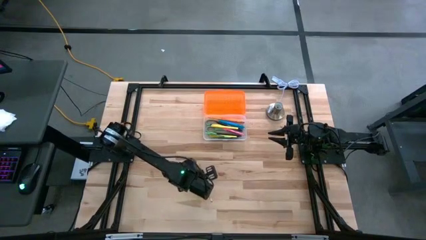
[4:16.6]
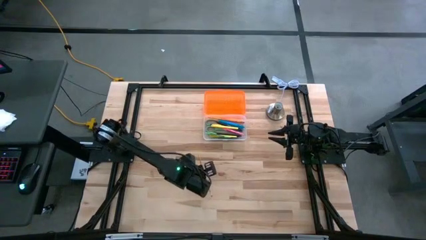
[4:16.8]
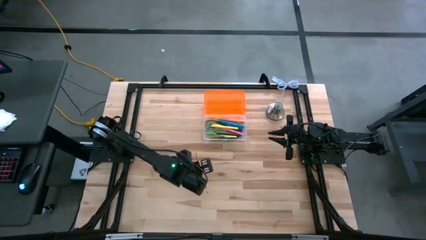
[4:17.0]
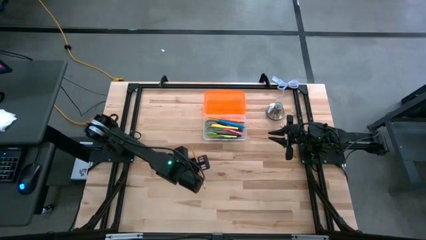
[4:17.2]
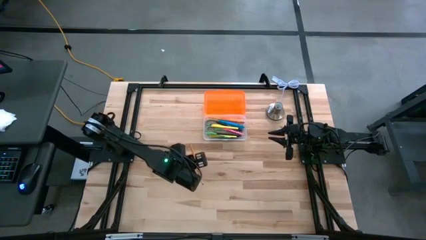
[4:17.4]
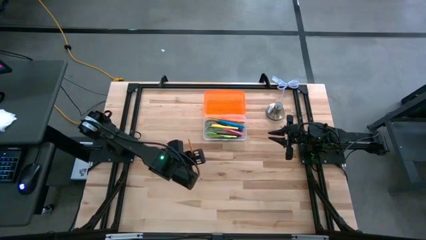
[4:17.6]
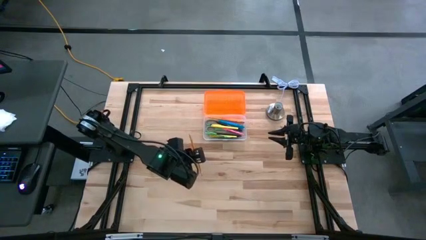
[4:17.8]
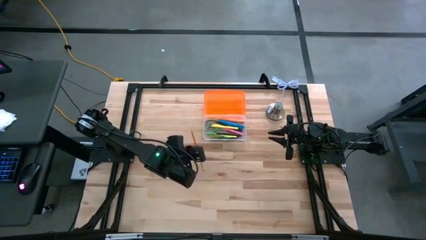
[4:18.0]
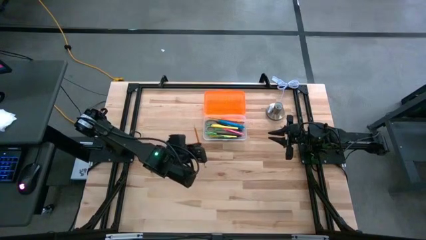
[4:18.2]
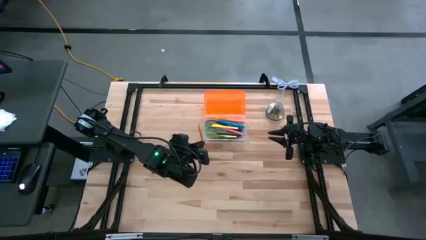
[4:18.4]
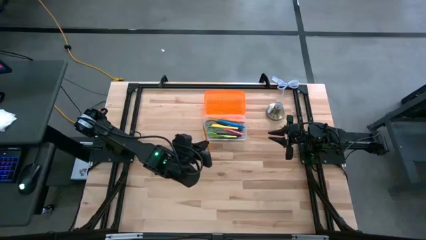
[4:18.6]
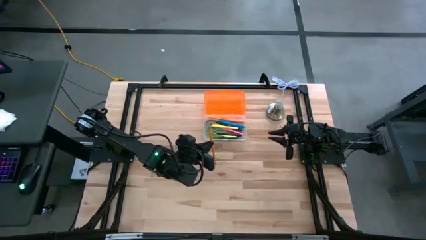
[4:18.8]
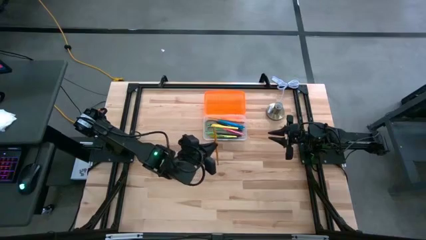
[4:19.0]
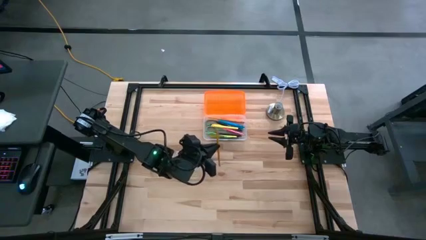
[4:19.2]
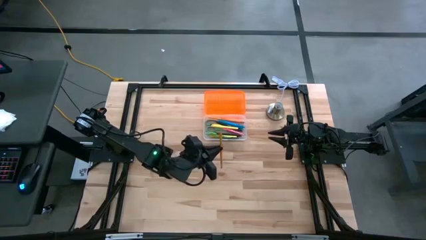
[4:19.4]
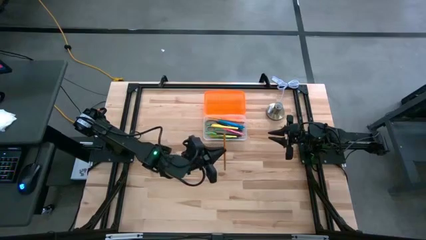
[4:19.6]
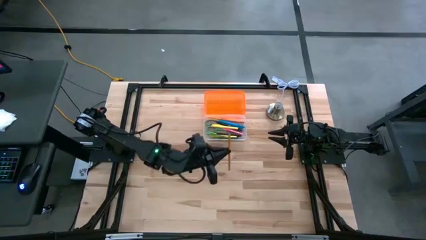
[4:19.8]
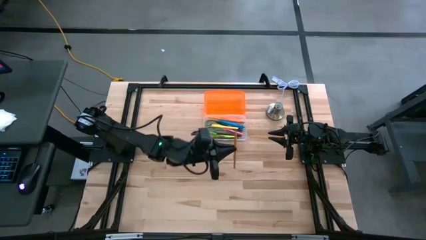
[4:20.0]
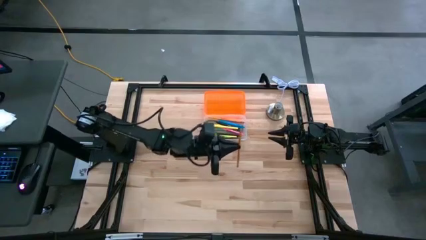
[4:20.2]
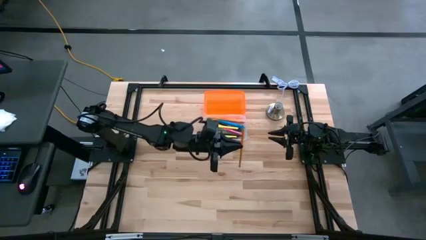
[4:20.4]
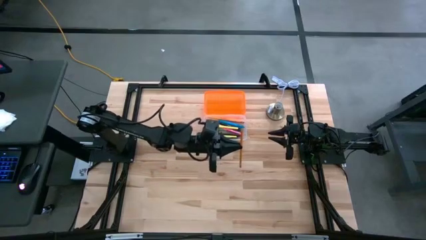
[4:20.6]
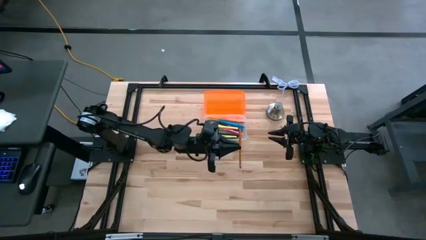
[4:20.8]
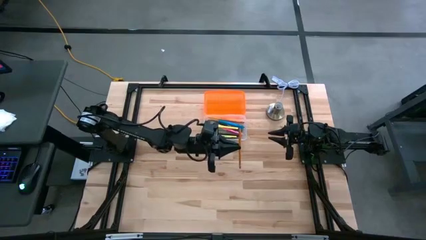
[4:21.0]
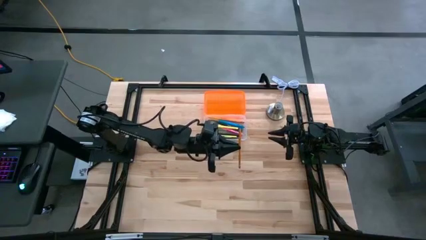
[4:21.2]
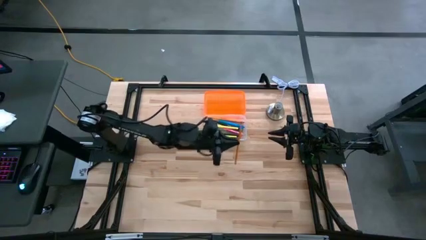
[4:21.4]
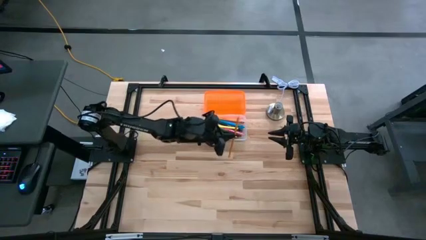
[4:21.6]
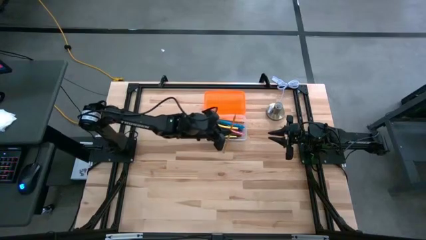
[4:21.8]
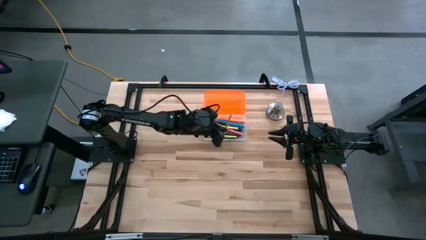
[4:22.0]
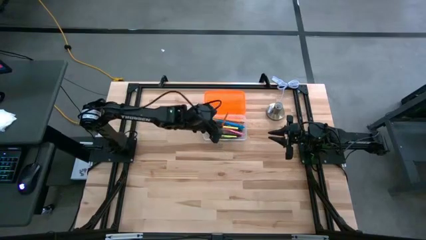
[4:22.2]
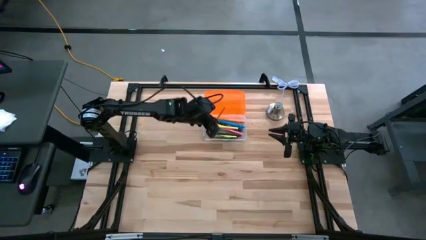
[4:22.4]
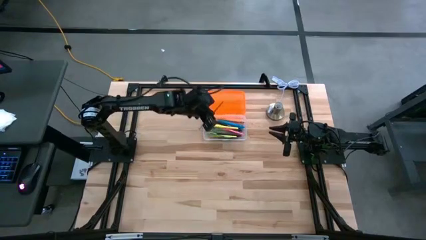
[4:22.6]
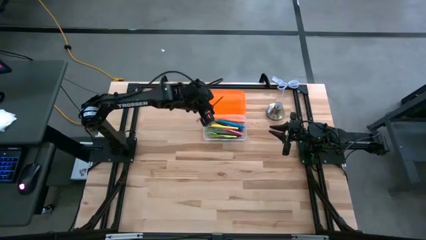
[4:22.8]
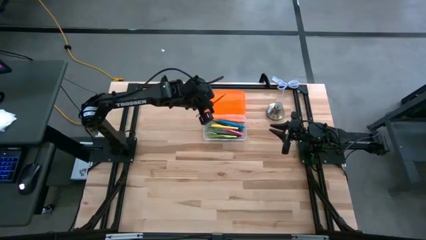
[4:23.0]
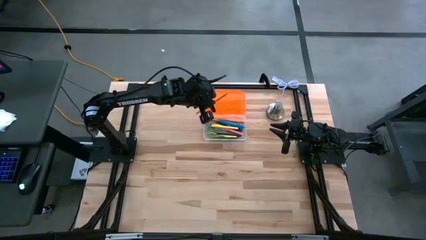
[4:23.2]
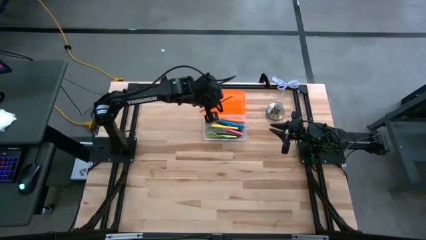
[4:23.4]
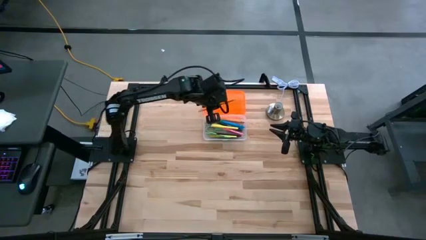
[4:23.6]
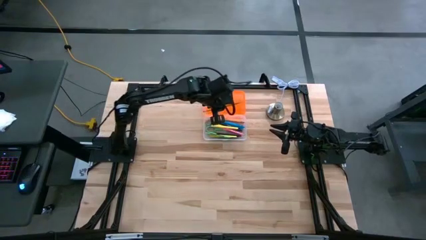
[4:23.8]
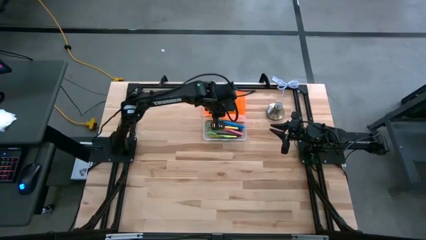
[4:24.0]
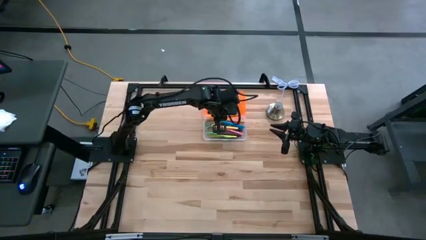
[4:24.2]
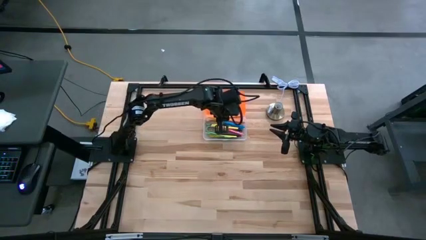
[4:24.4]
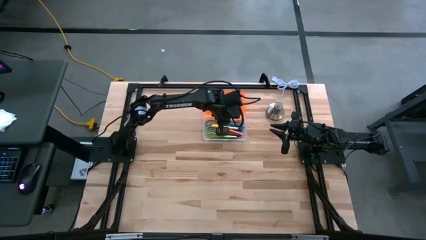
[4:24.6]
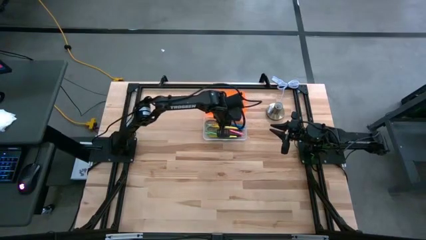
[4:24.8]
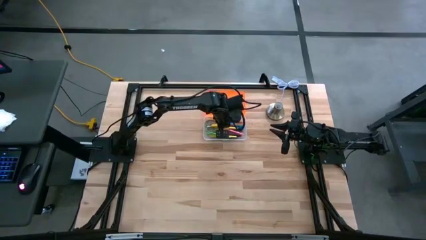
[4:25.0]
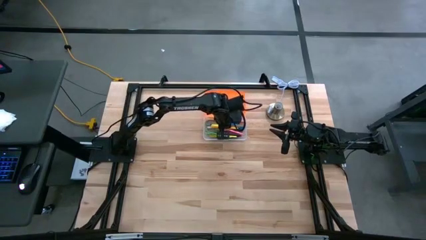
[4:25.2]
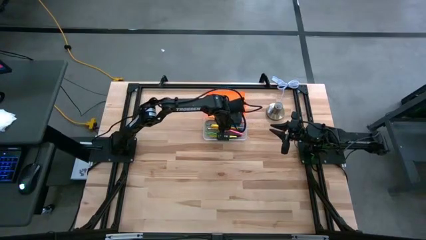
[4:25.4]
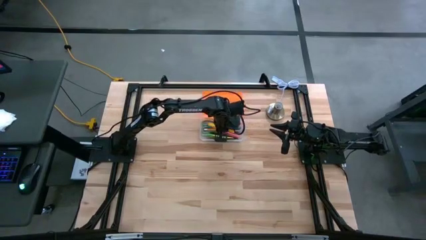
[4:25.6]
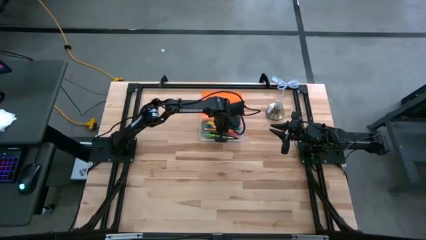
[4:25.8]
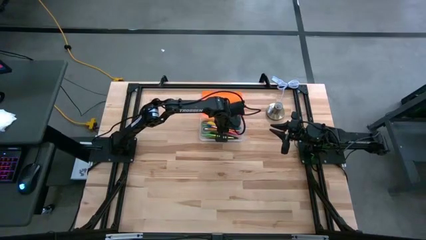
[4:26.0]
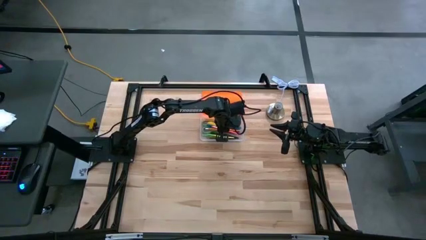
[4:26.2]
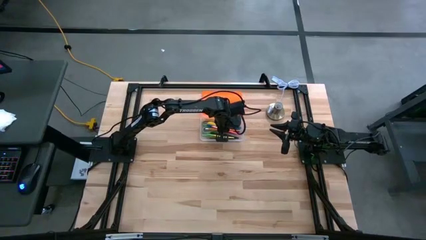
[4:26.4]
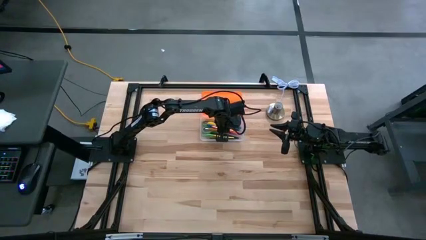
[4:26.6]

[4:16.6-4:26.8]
Task: Pick & place school supplies into a supply box
Put the orange pencil into the supply box

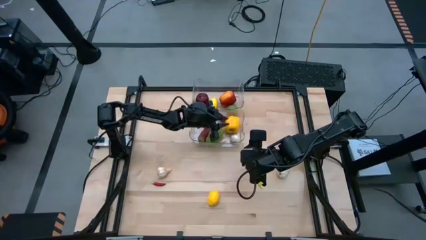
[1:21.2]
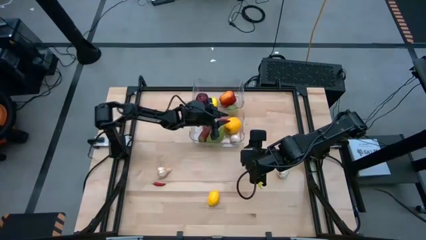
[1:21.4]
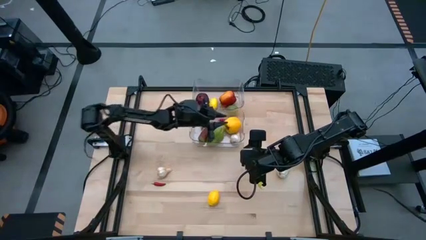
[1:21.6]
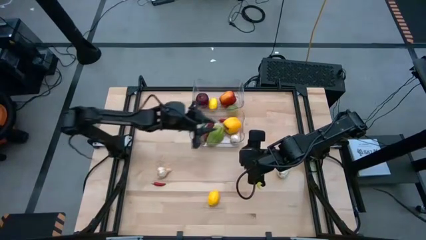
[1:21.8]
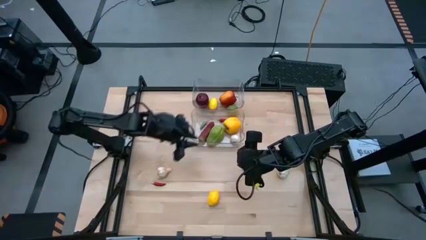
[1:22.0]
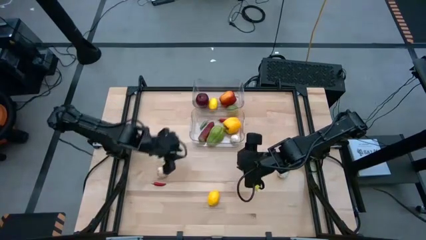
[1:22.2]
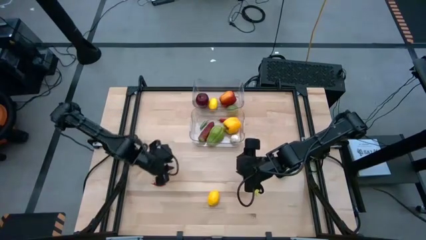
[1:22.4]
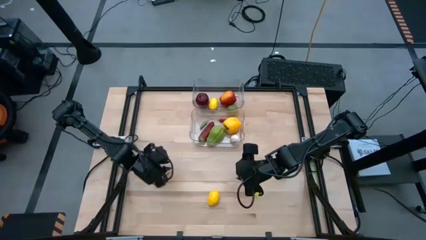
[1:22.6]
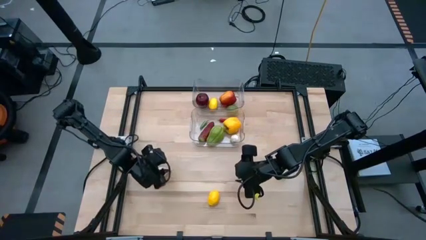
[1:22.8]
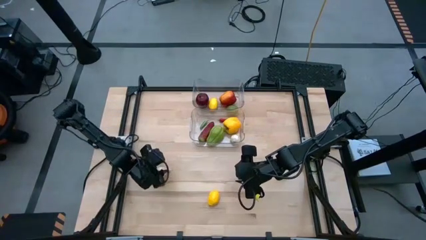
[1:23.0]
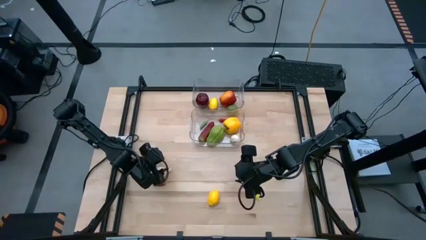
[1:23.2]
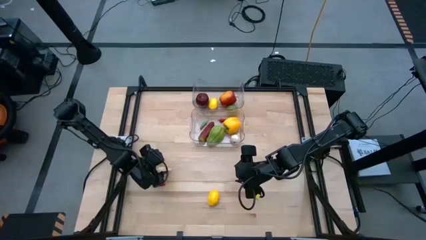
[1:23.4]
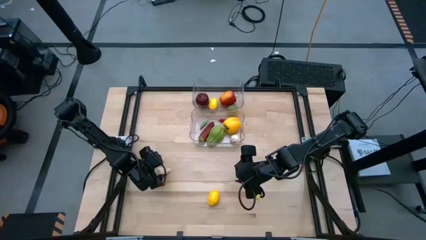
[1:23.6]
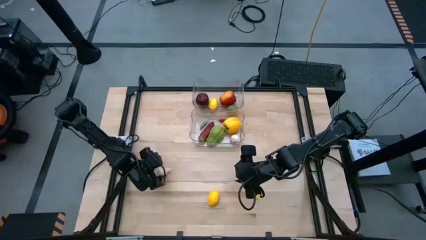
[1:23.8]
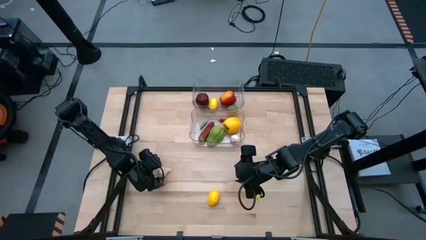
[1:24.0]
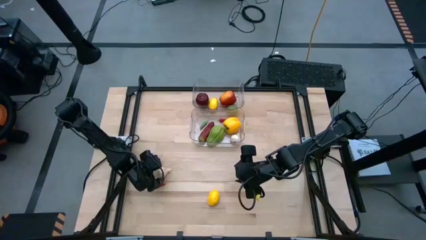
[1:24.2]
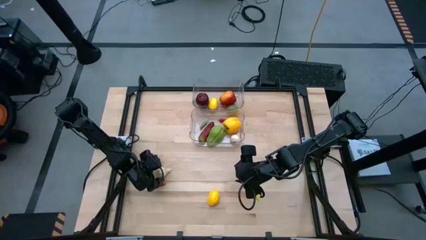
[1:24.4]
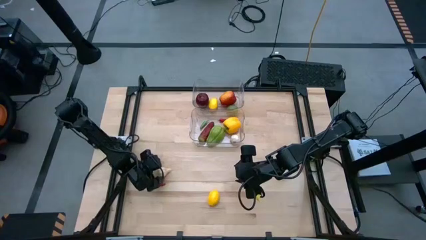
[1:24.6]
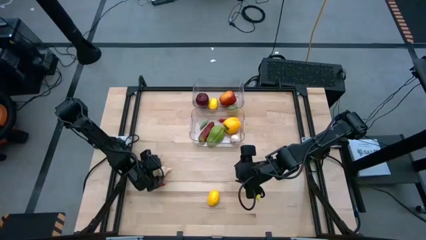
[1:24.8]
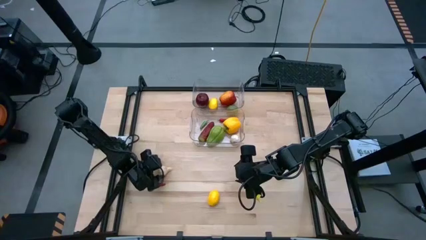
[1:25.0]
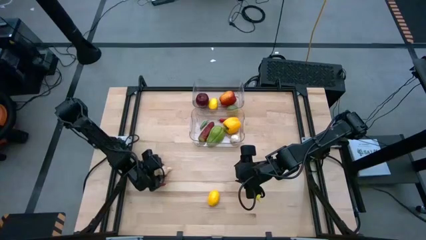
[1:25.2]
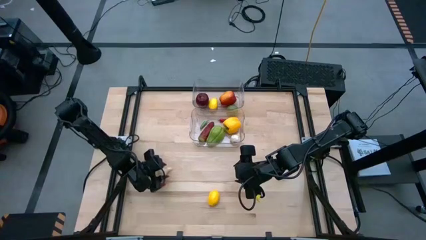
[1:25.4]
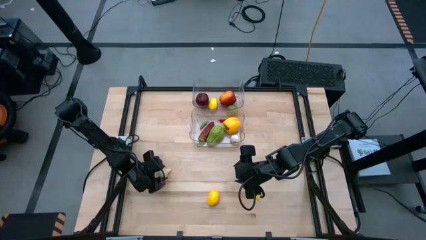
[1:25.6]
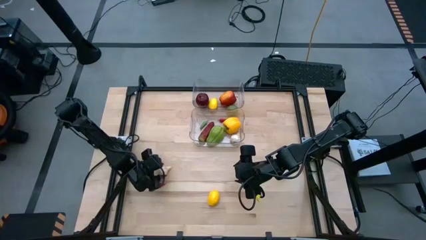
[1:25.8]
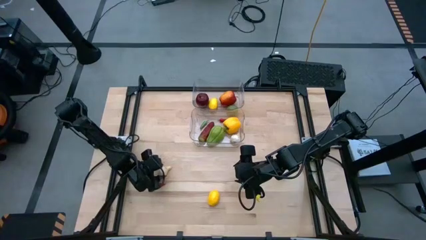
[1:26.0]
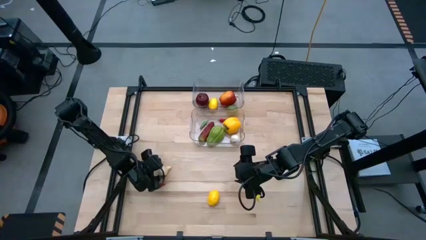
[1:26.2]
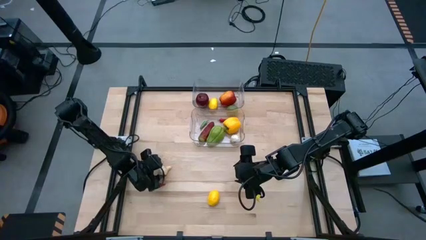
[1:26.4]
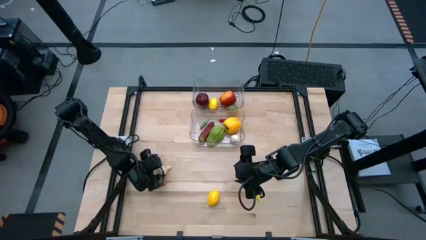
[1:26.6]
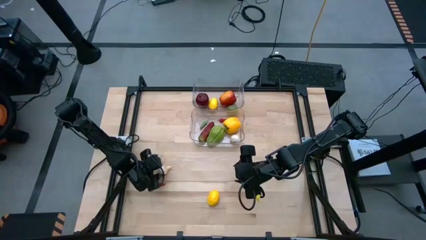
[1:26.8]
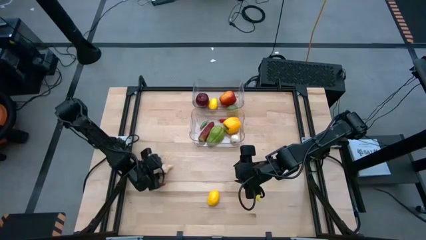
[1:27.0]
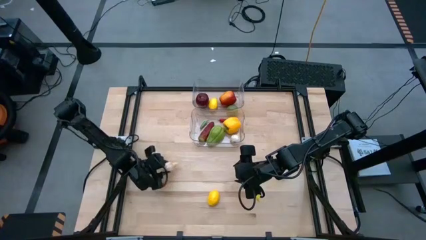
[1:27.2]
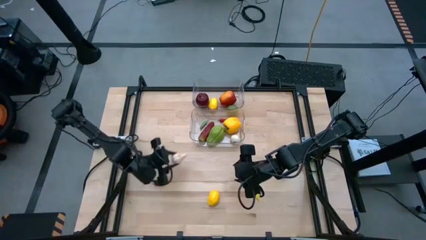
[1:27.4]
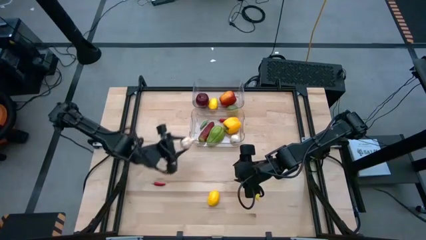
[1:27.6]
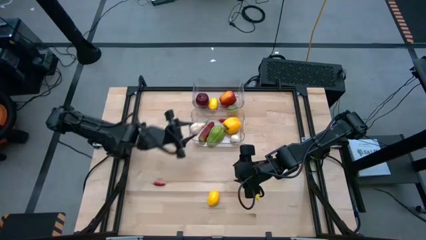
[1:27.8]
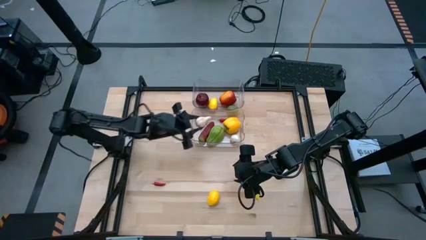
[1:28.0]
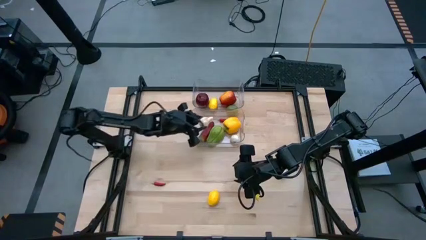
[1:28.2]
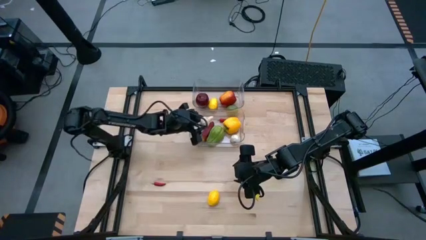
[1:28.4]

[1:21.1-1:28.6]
Task: Sort produce into baskets
Put the left garlic into the bottom transparent bin
